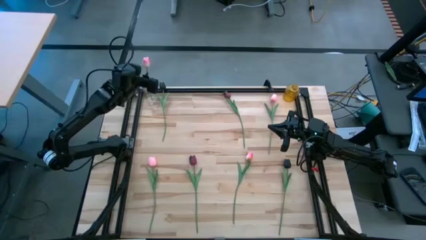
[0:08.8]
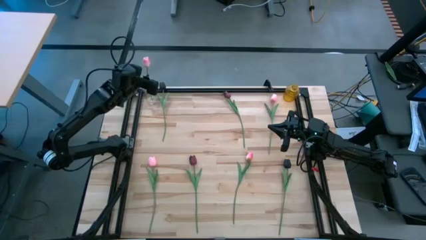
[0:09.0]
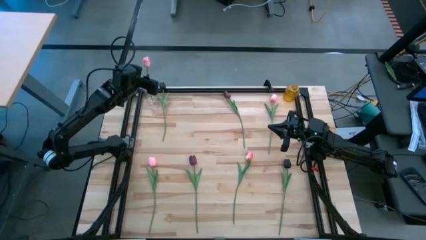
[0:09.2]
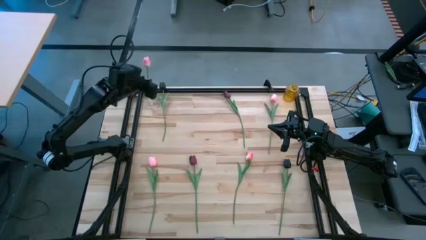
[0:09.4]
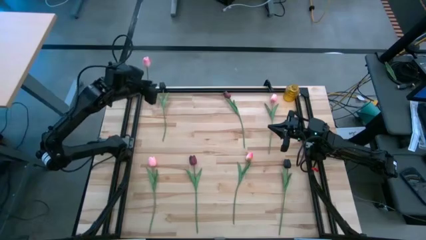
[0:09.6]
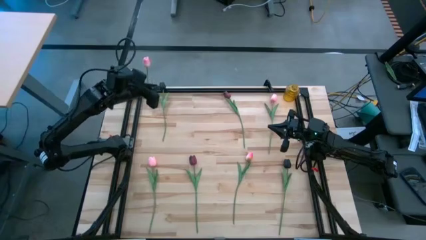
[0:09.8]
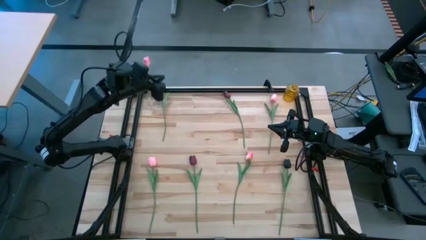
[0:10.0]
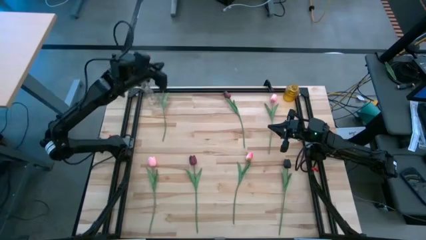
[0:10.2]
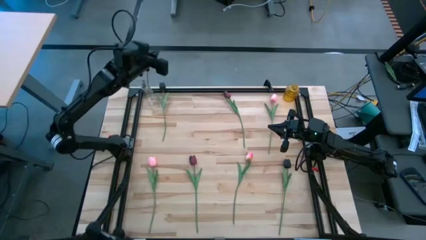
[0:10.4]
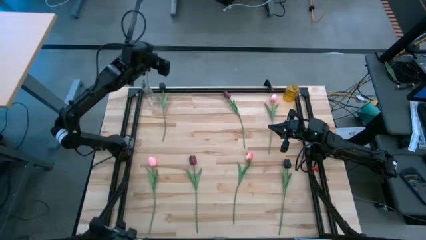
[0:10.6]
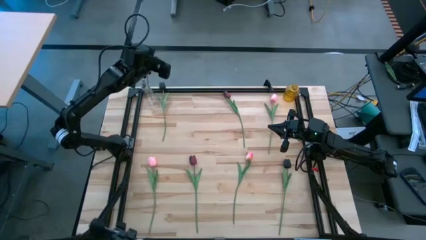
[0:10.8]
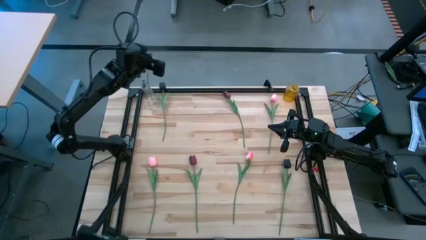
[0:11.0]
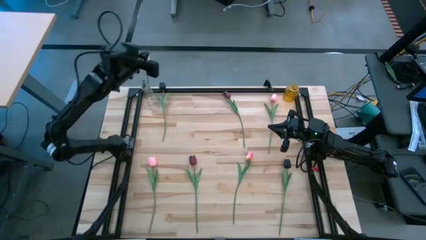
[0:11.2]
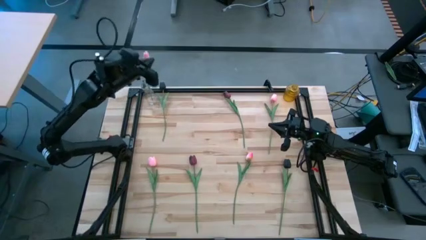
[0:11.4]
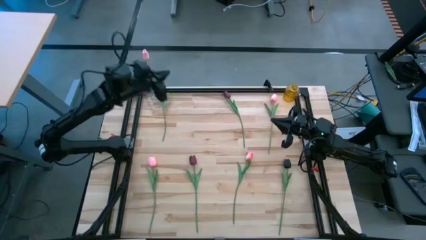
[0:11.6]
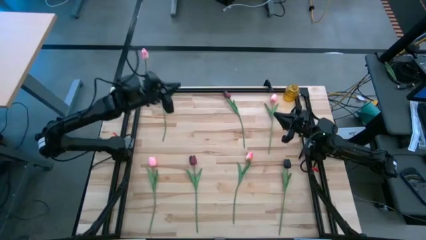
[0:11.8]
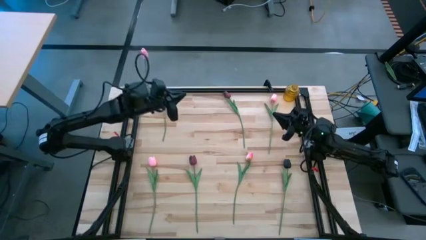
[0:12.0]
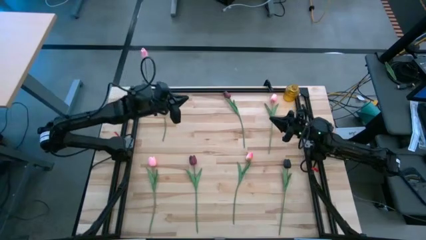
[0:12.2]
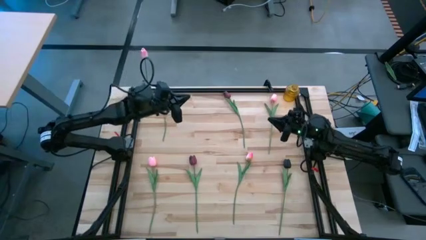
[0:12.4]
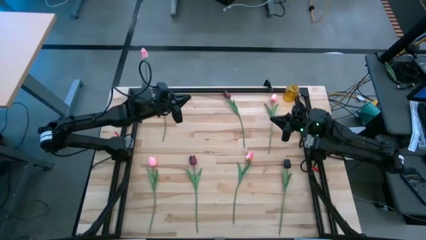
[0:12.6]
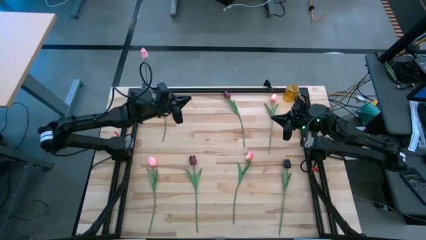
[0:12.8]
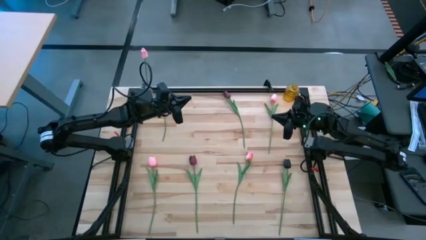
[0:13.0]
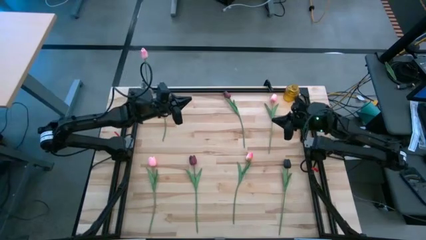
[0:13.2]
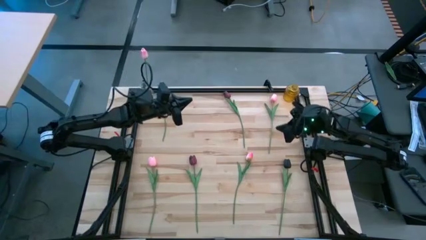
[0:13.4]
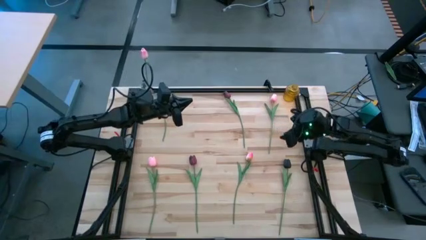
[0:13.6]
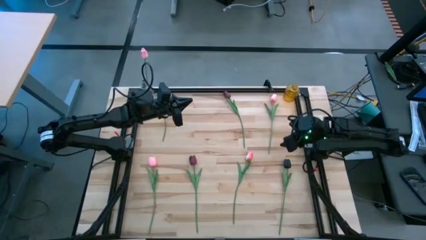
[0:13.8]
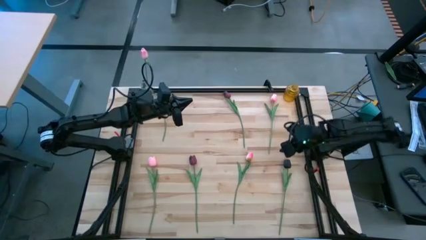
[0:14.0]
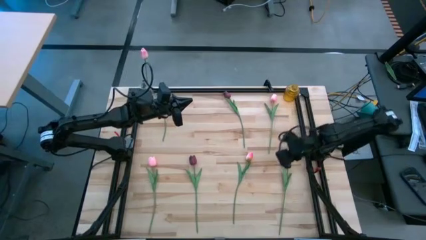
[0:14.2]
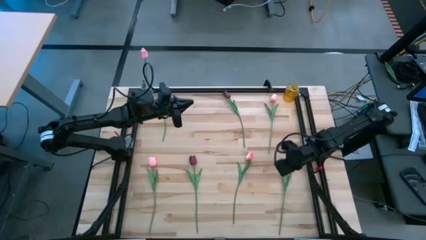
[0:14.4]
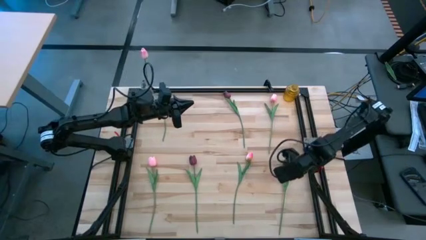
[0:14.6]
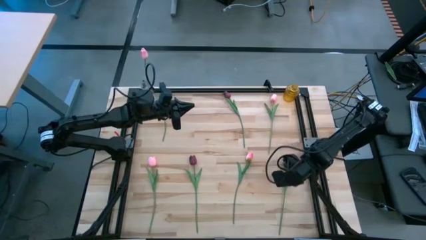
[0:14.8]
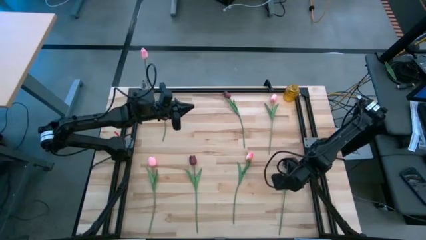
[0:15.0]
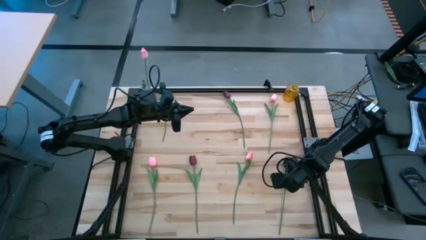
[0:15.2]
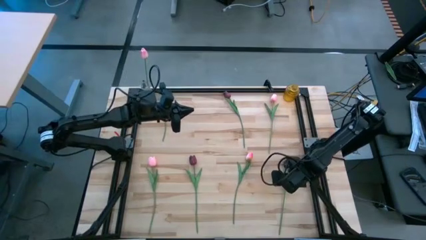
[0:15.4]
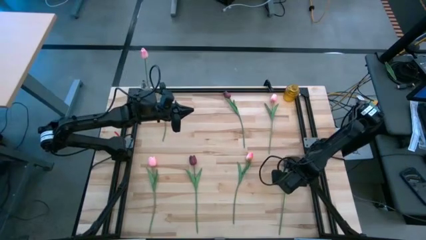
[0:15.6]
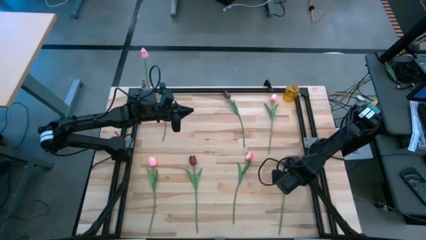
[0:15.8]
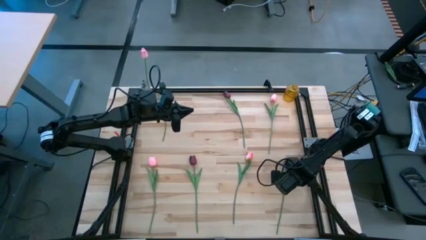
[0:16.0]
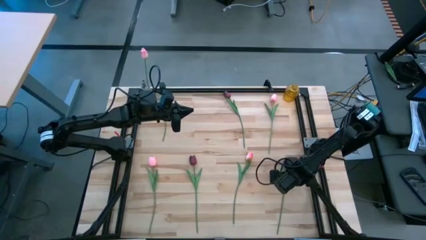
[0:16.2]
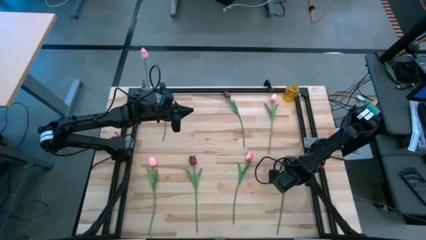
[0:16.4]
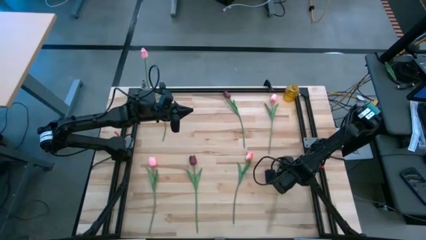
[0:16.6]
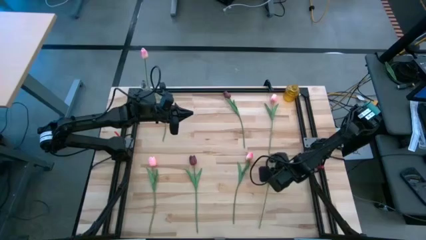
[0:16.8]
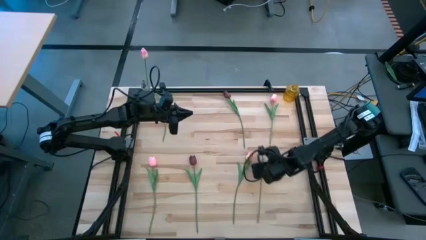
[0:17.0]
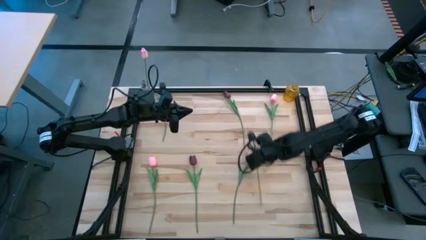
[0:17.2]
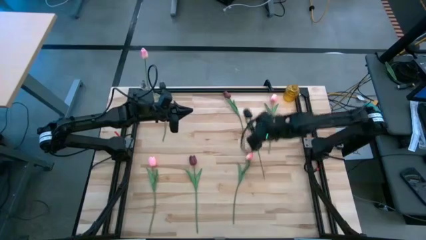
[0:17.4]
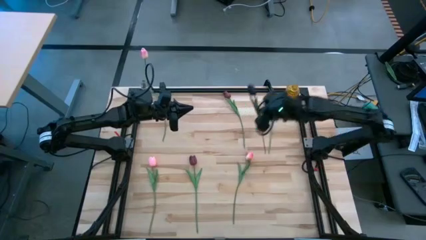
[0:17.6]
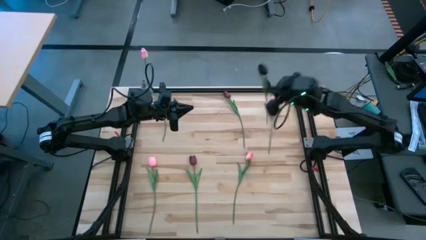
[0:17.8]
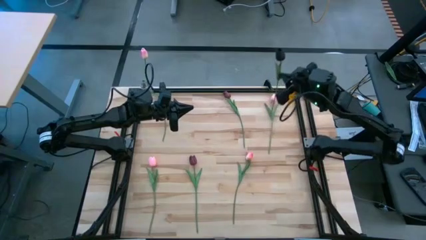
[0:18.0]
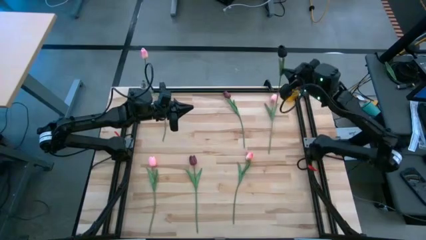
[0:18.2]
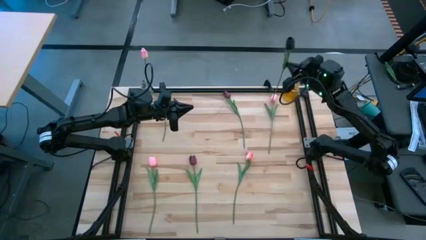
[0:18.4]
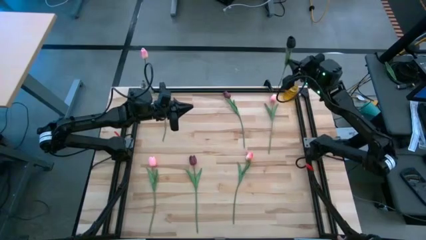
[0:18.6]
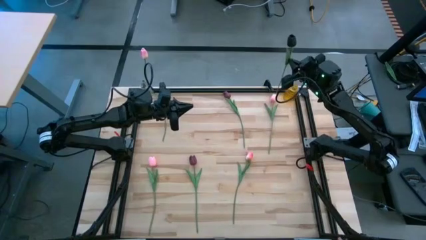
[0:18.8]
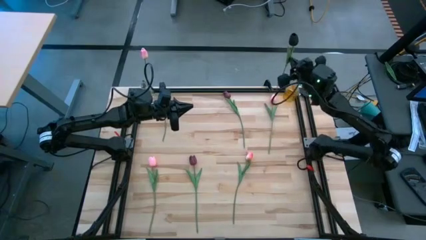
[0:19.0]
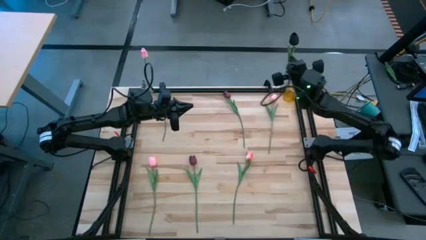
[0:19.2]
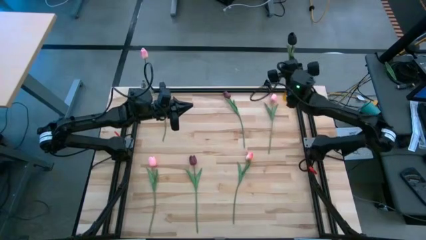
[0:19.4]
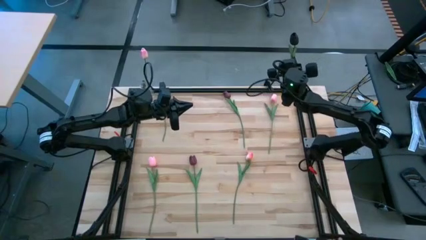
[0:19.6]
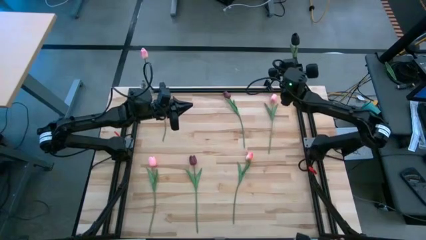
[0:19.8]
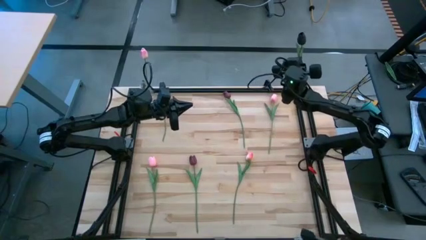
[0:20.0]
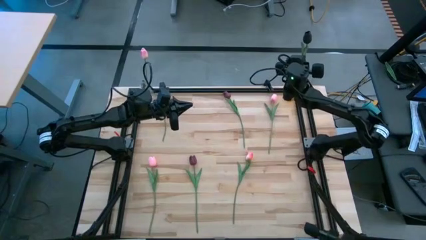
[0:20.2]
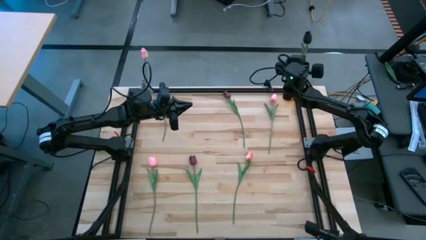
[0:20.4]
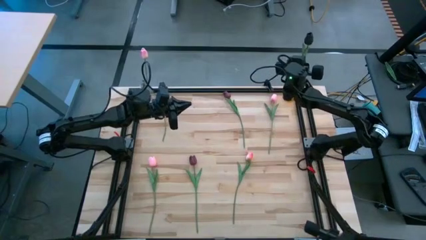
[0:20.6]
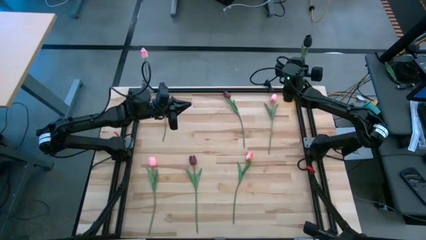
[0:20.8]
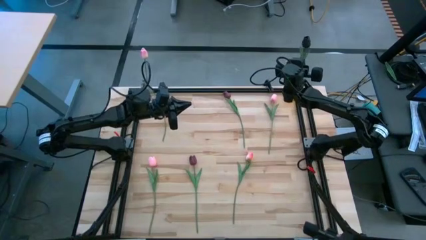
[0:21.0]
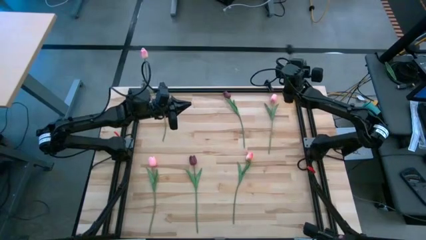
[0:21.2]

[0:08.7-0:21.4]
Task: Sort flowers into vase by color
Put the right black flower into the yellow vase
